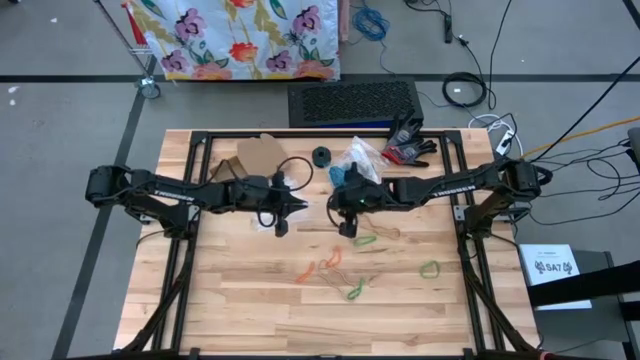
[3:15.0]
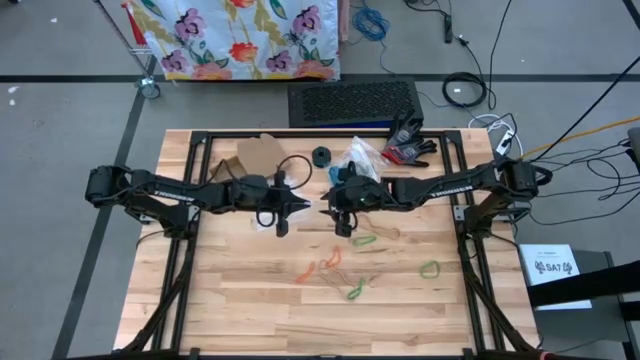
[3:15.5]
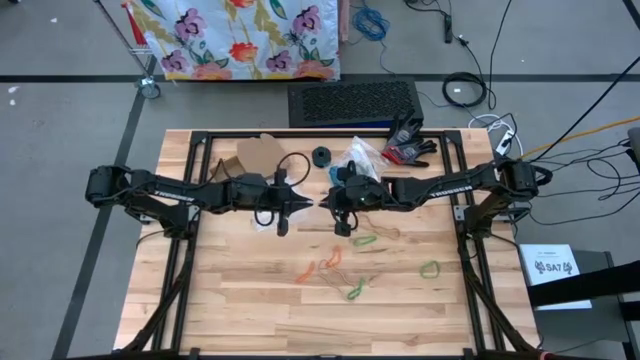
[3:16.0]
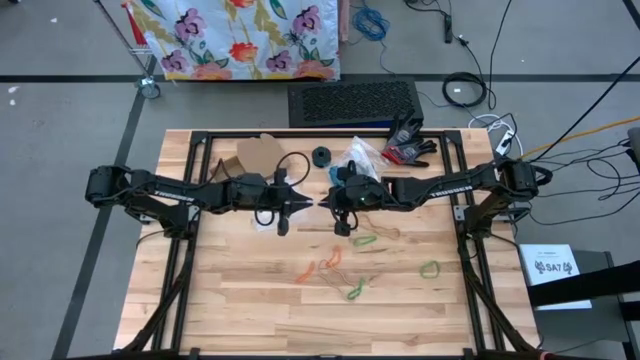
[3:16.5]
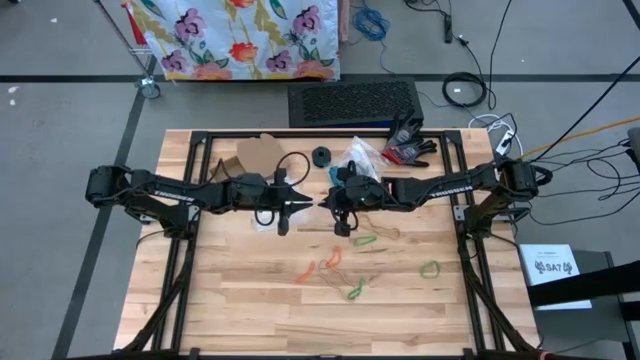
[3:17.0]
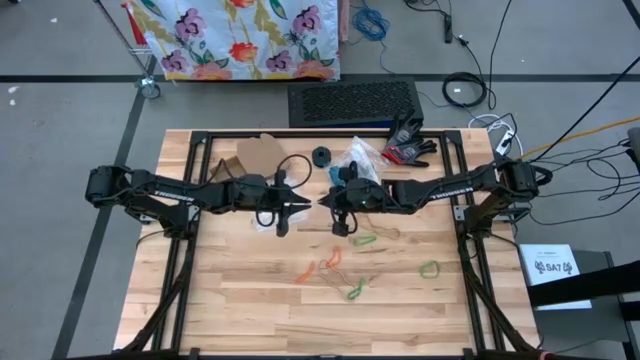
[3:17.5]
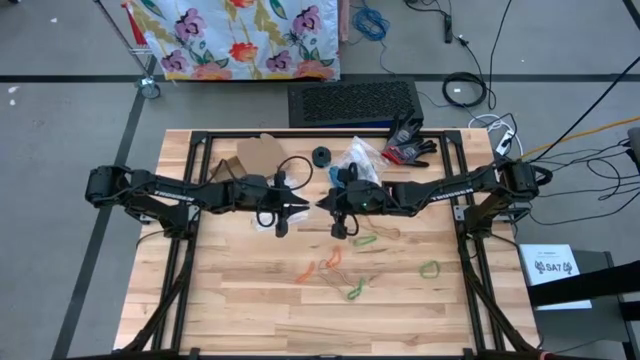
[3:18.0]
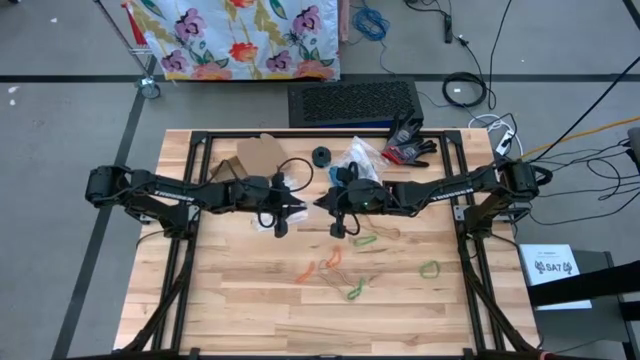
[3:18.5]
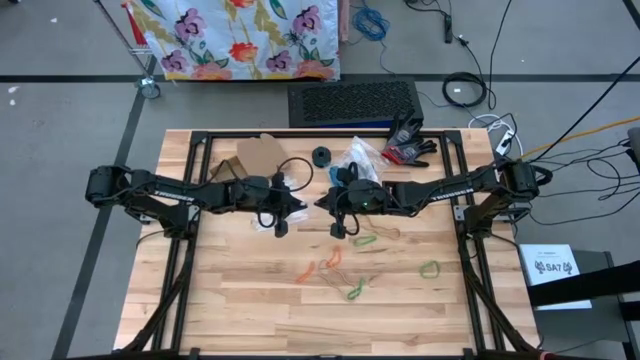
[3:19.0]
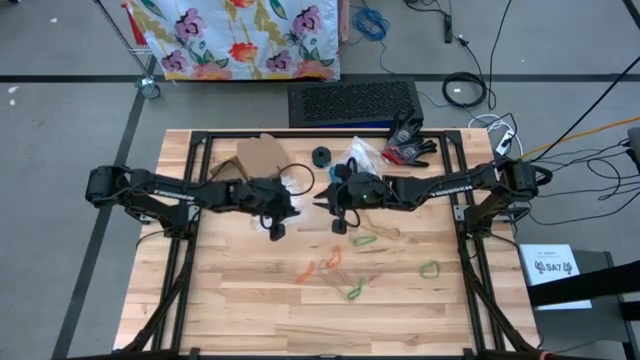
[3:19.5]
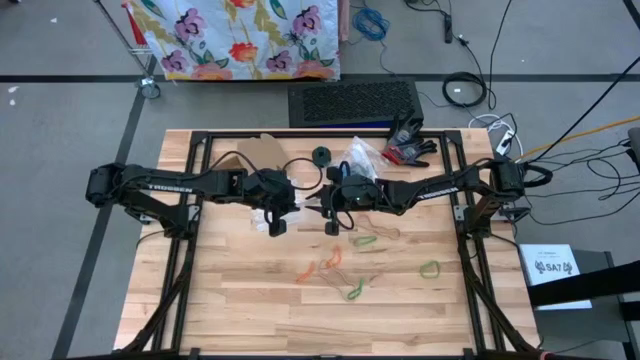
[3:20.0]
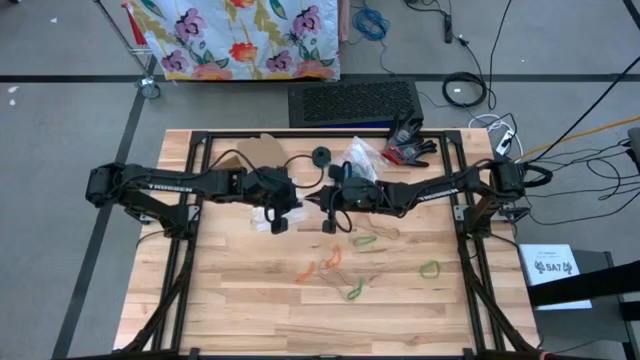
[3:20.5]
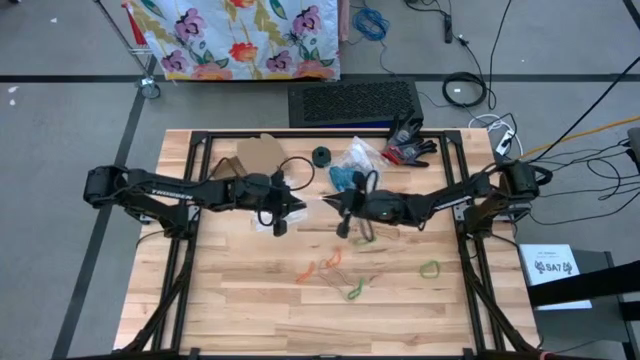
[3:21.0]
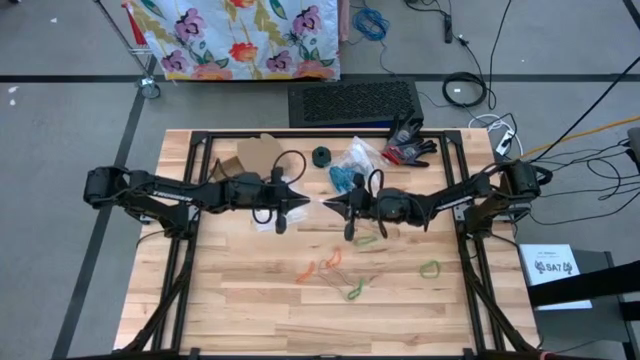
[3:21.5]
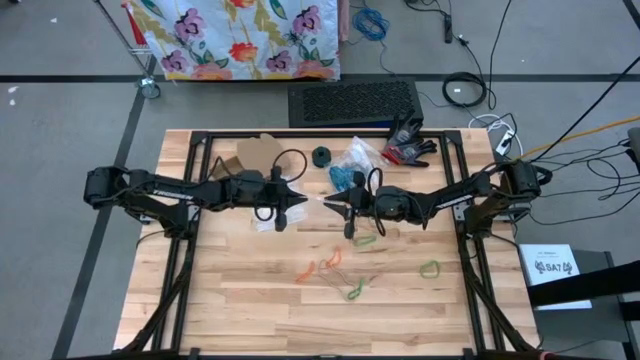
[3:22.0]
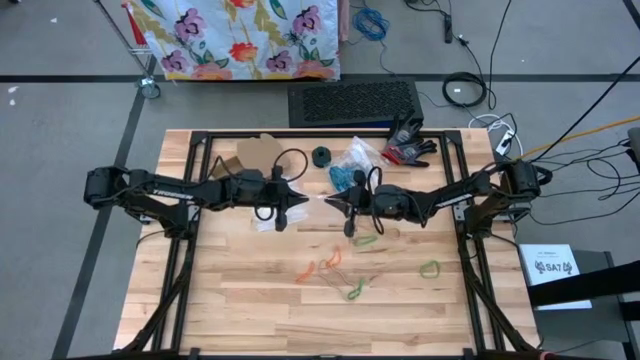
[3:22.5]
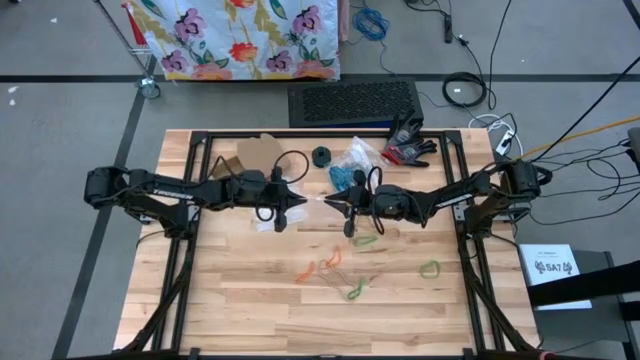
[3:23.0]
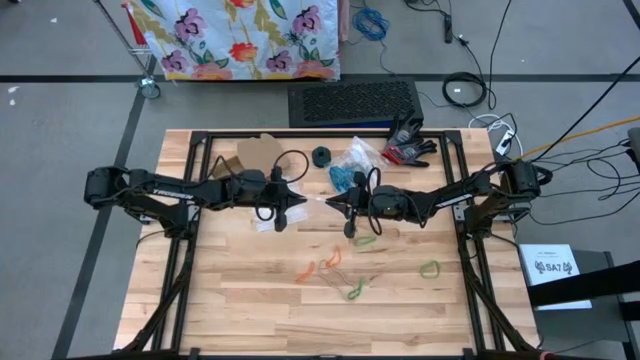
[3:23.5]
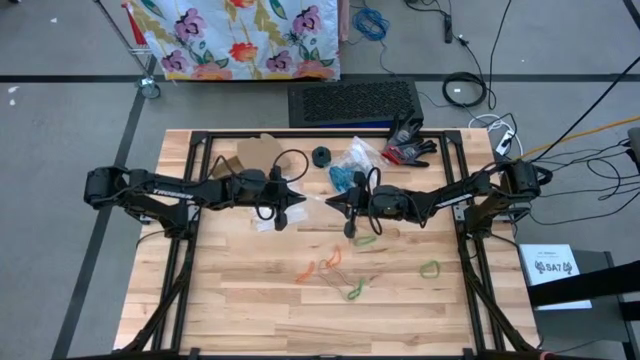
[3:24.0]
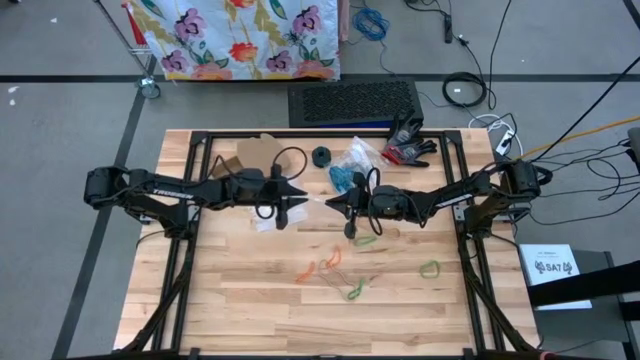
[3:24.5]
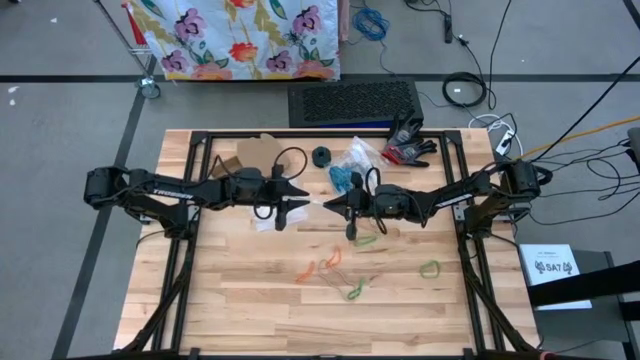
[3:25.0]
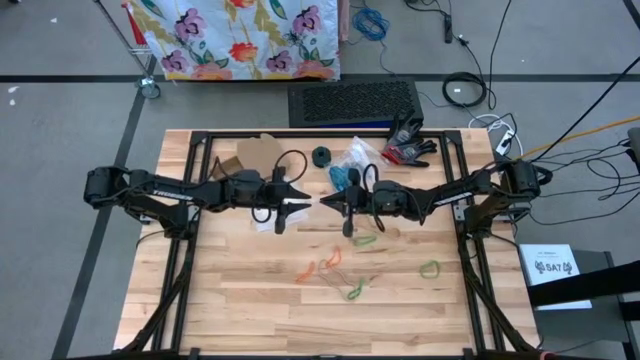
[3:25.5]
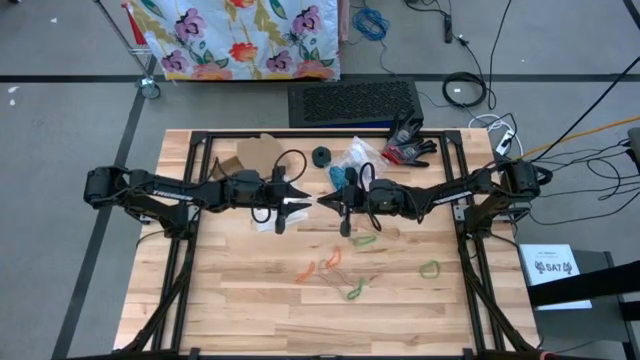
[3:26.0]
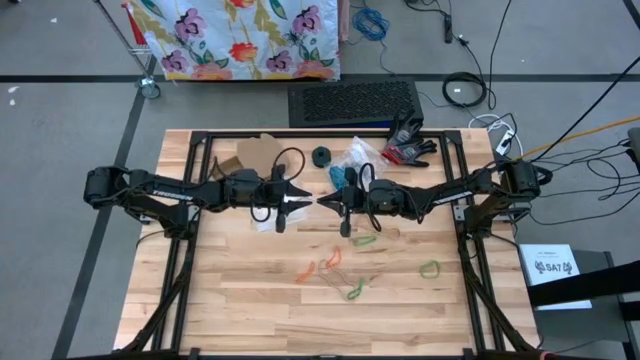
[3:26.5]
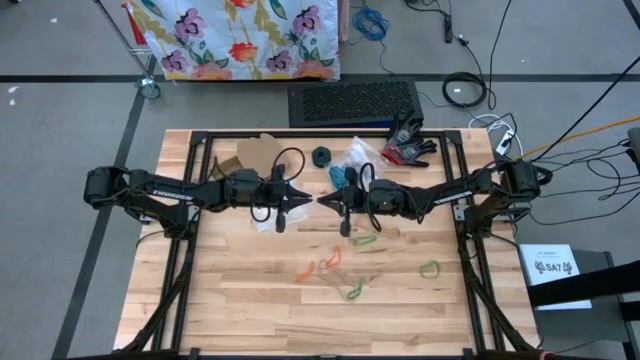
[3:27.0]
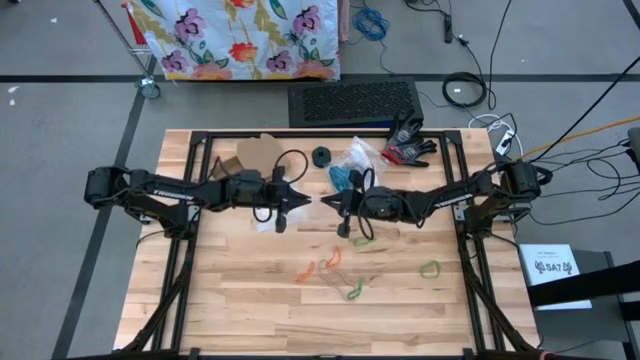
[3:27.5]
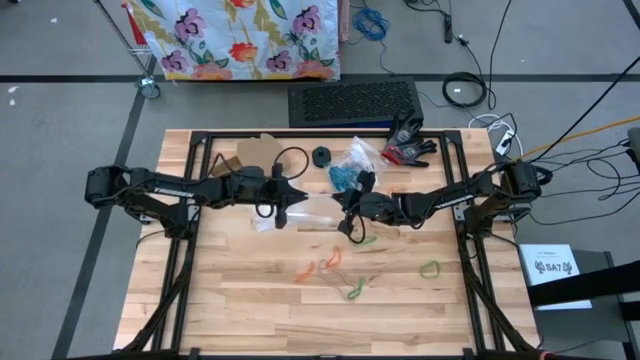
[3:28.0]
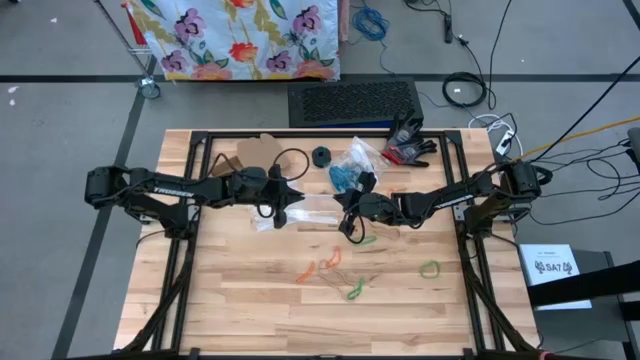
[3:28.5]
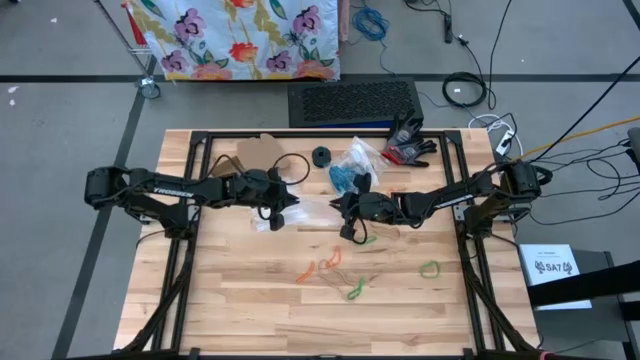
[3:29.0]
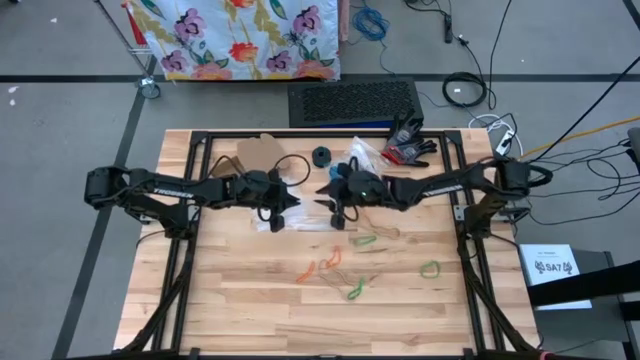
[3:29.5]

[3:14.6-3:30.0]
Task: Sort rubber bands
Open the transparent zip bag

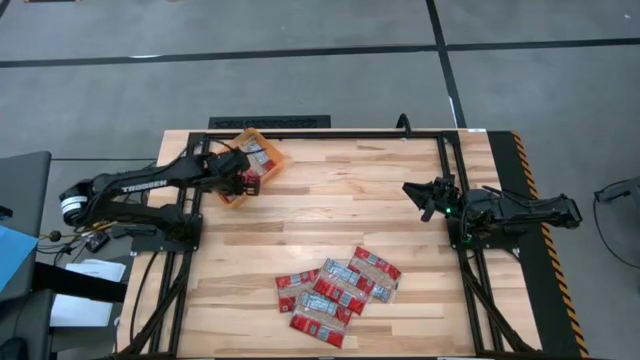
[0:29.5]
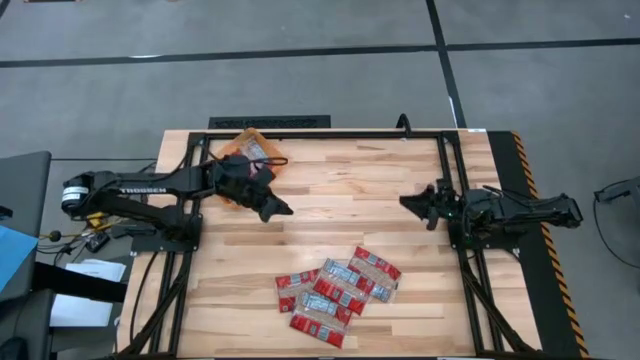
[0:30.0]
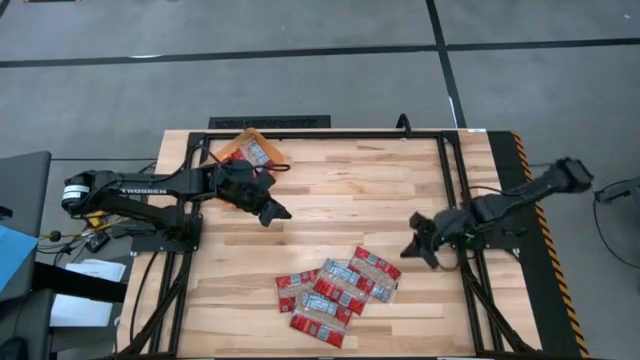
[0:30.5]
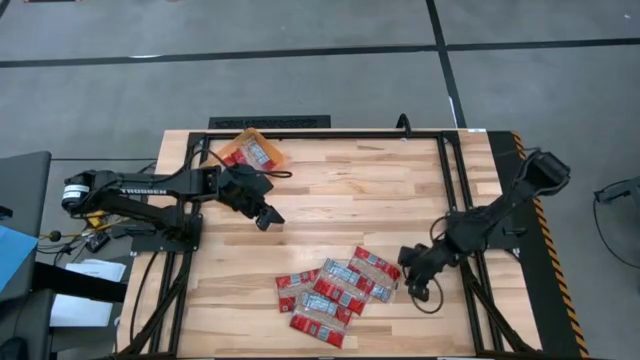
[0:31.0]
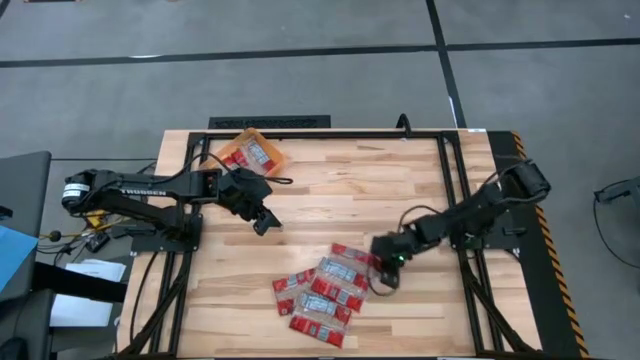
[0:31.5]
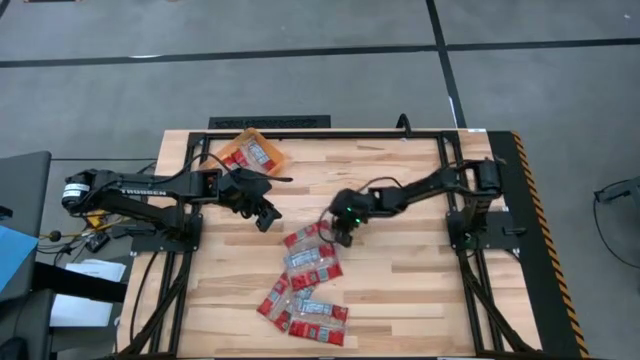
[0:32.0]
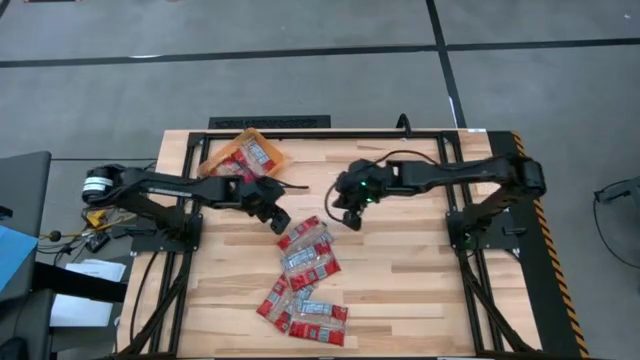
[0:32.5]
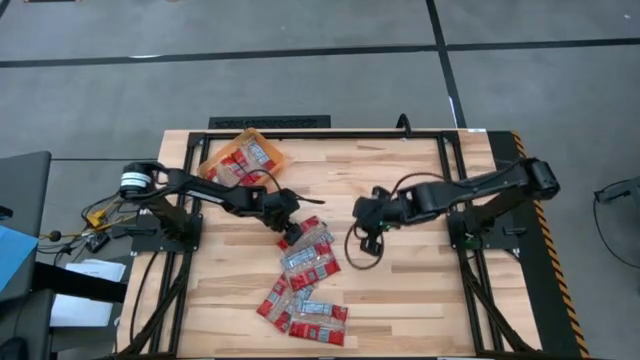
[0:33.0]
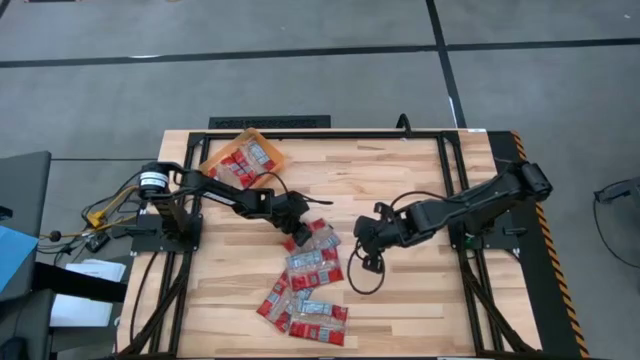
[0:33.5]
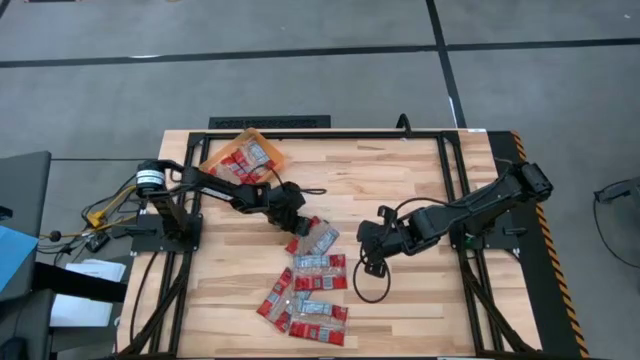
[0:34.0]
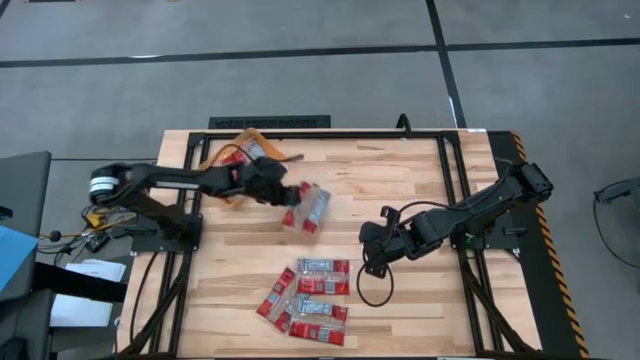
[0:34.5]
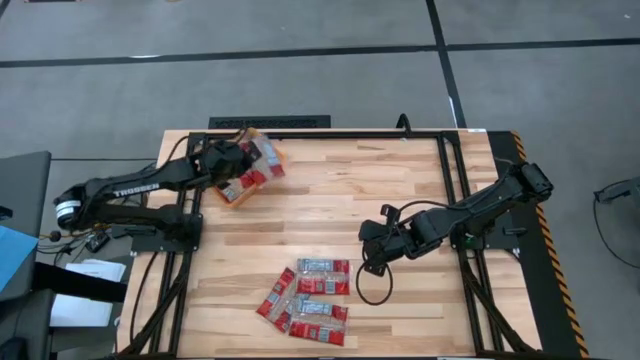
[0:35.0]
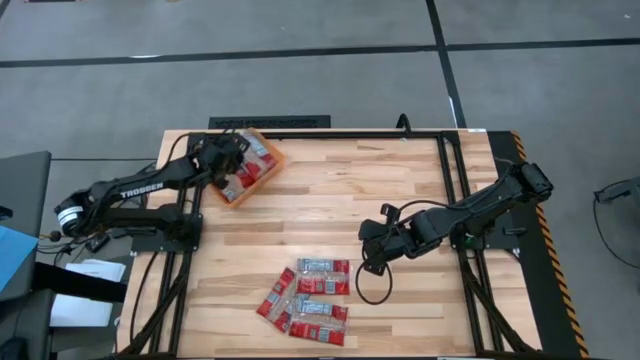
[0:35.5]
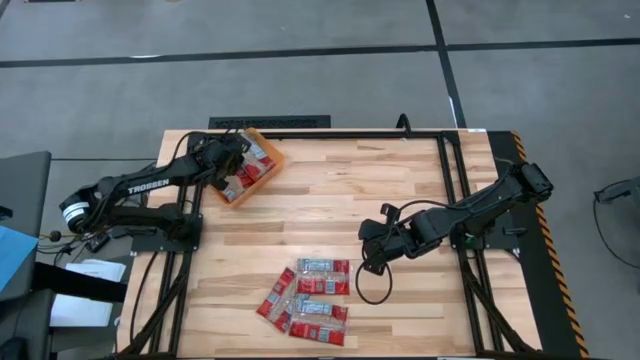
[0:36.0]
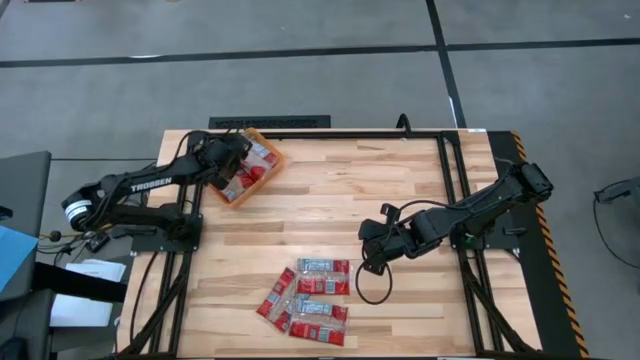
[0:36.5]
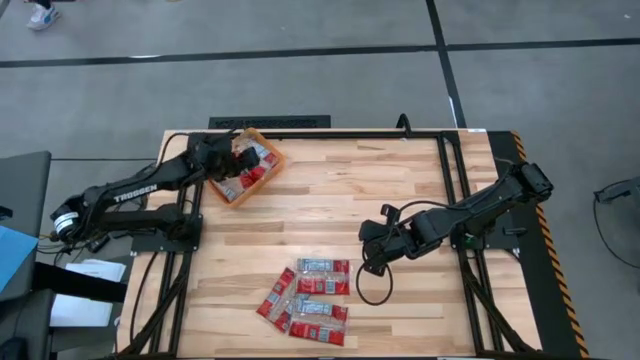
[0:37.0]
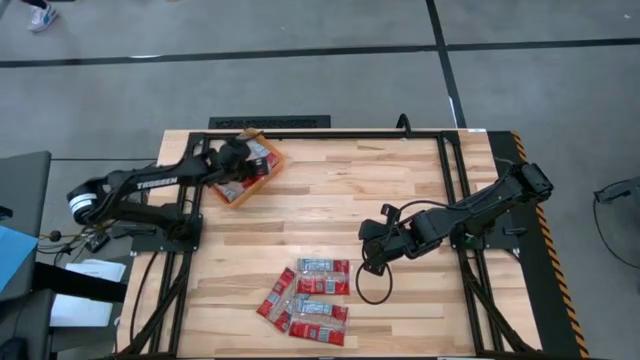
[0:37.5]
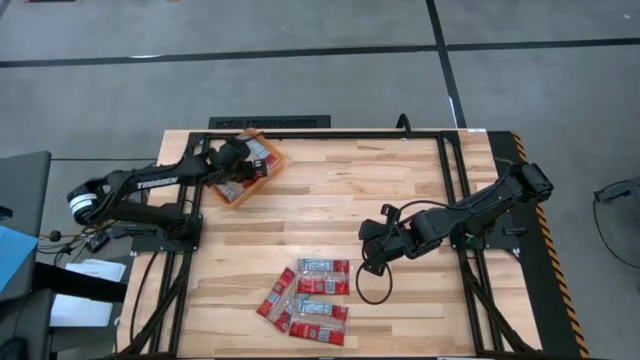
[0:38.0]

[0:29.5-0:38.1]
Task: Sort popcorn bags into baskets
Put the red popcorn pack into the orange bin
